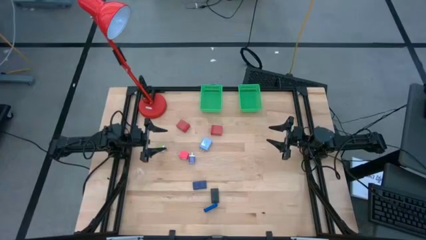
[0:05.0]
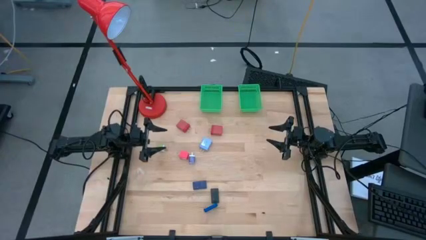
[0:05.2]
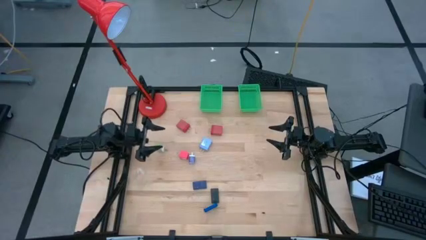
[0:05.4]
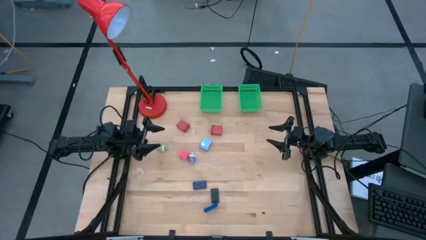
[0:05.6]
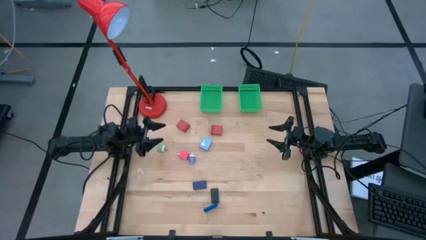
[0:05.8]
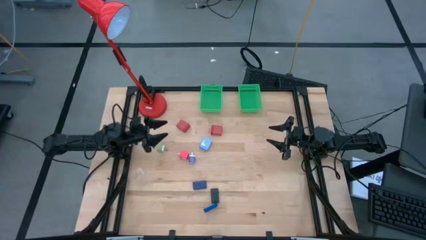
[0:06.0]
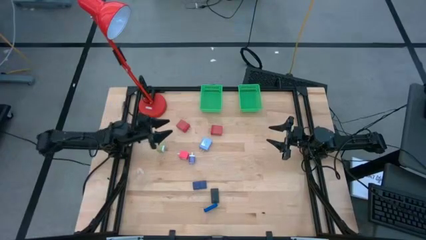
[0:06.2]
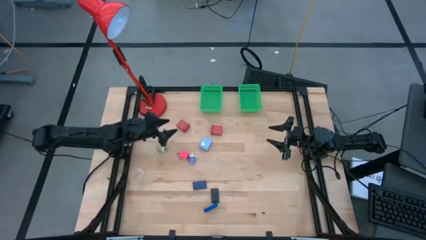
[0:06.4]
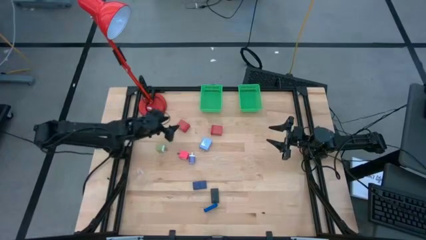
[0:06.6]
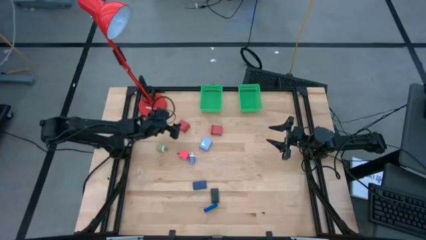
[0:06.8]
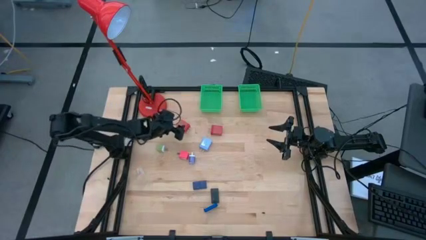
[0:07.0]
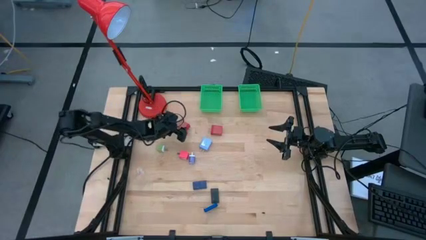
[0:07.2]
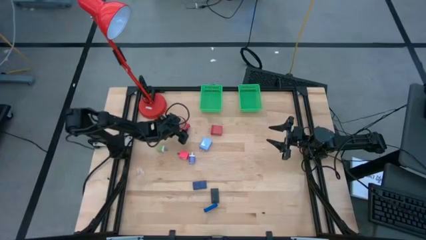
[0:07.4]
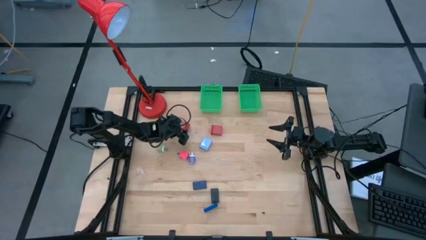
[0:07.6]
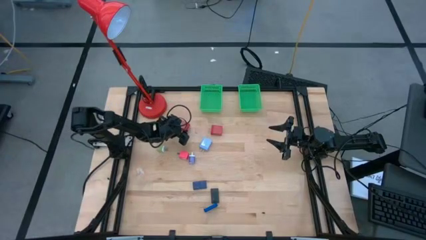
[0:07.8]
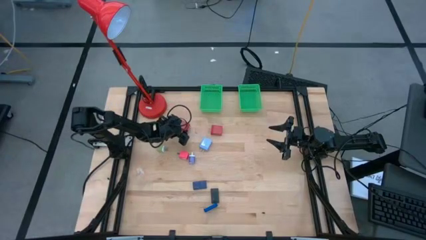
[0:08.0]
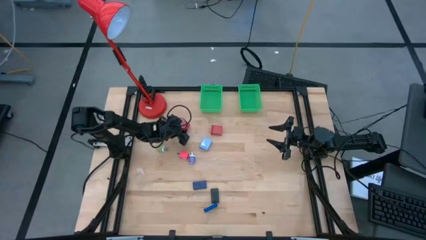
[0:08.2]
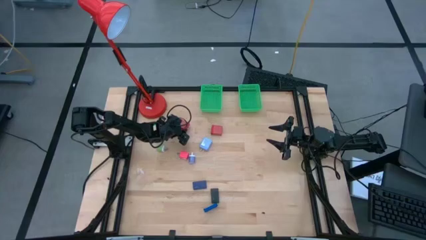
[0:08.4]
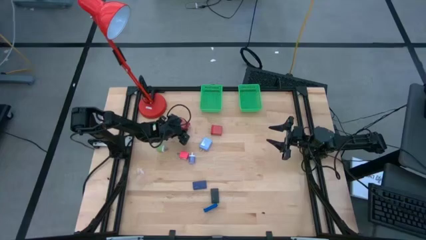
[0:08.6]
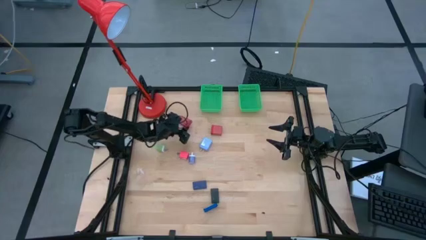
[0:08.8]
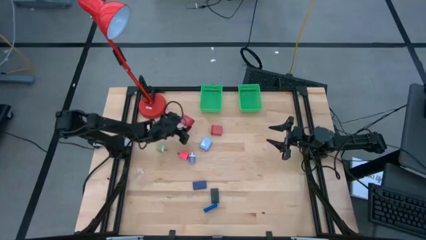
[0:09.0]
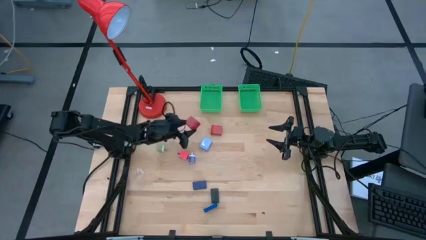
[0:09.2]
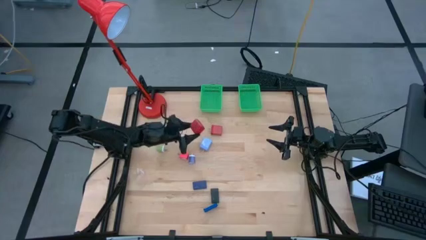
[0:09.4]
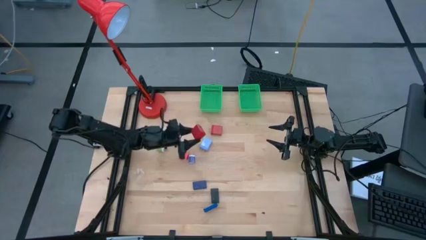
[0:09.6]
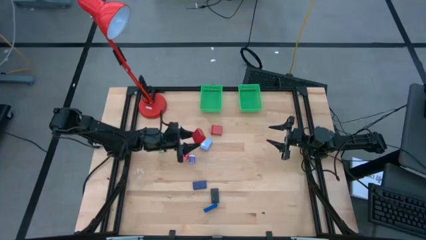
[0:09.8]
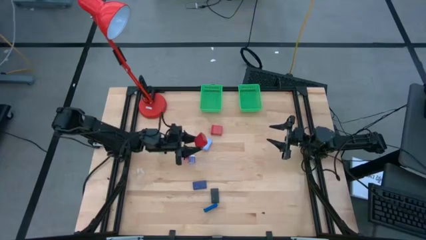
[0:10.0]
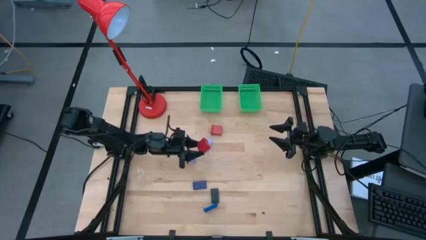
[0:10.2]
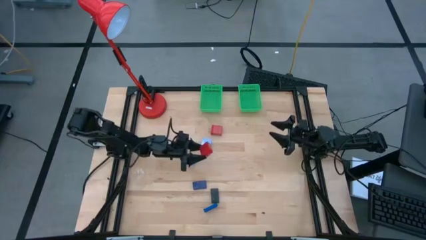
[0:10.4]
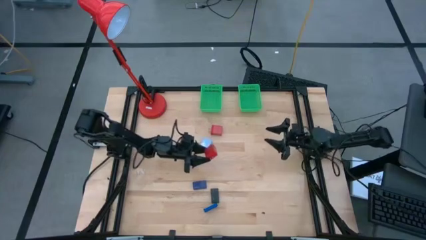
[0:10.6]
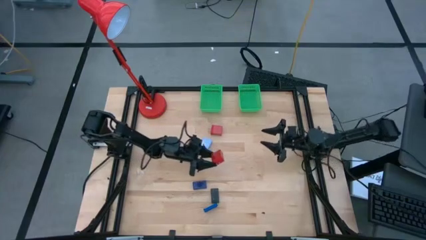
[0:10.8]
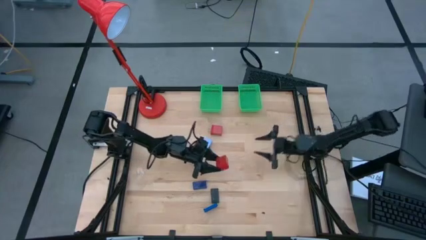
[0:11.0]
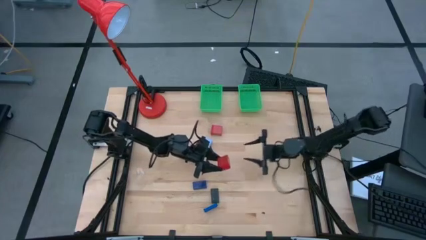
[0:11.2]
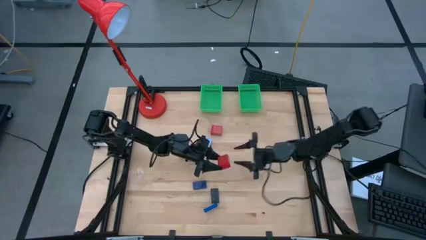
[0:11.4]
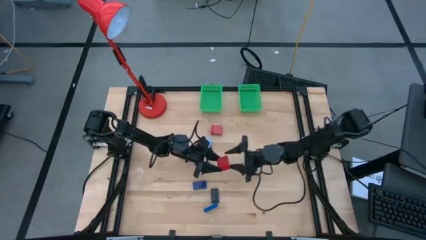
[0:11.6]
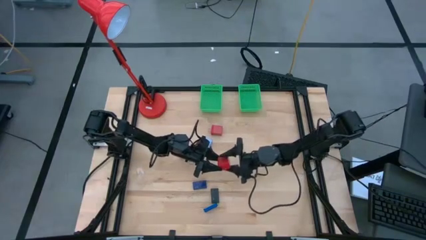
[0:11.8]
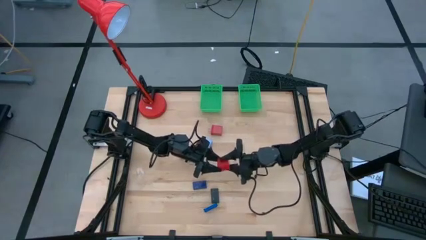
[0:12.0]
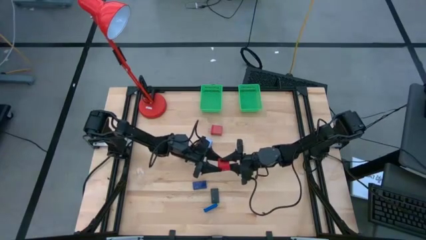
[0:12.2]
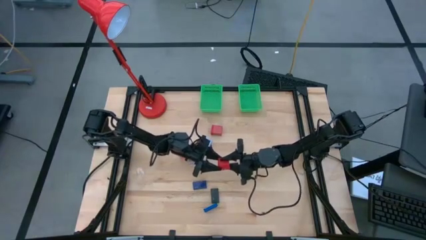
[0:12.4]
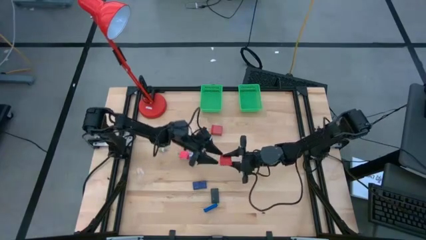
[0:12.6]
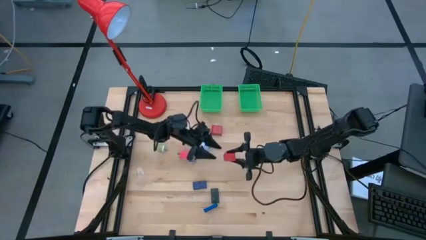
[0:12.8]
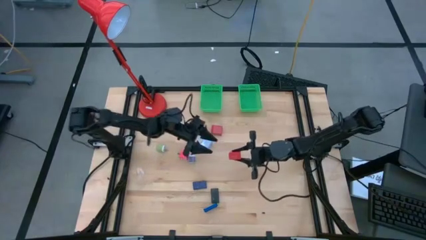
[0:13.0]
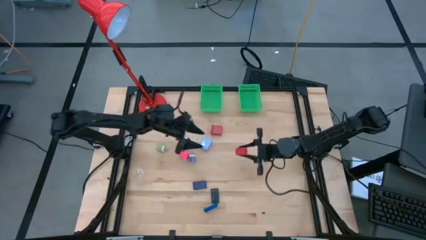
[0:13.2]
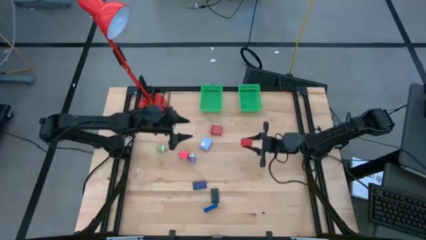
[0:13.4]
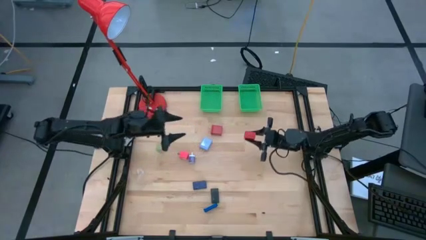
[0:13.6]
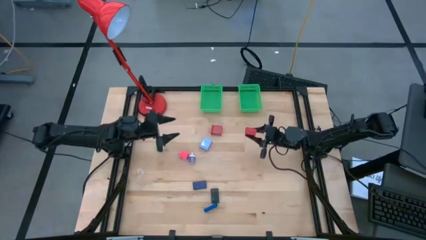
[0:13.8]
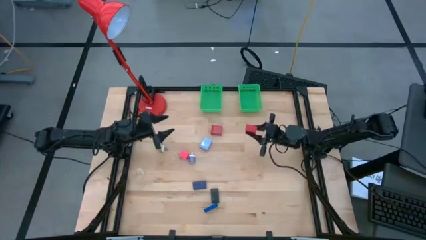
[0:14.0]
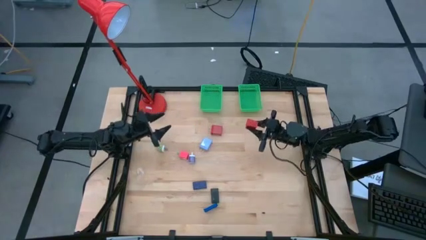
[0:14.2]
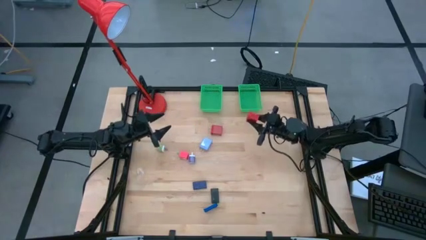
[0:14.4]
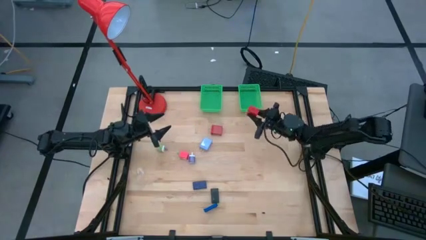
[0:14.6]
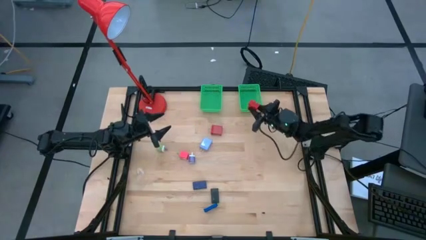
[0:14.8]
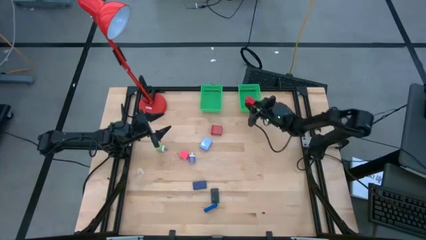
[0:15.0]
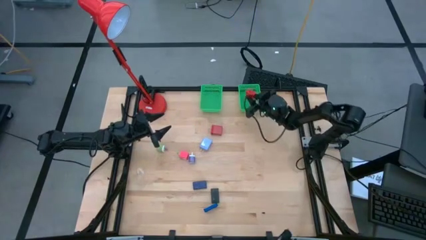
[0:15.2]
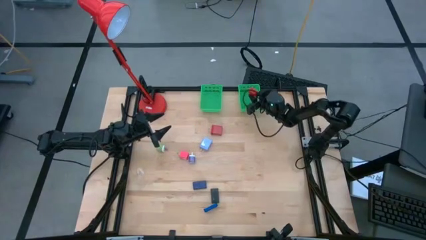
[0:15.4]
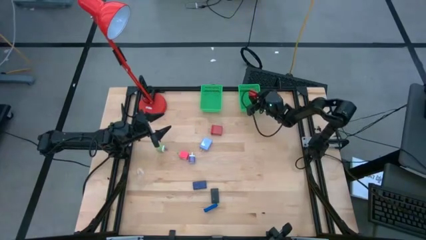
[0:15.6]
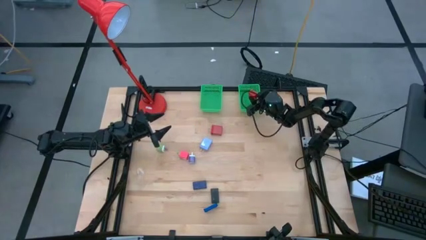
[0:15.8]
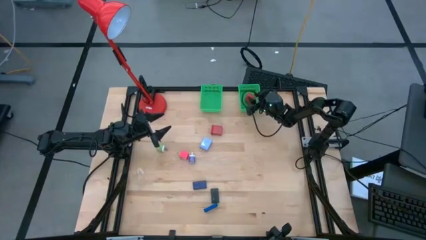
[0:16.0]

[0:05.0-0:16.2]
Task: Pick & Place Office items
Put the left red charger adapter into the right green basket
